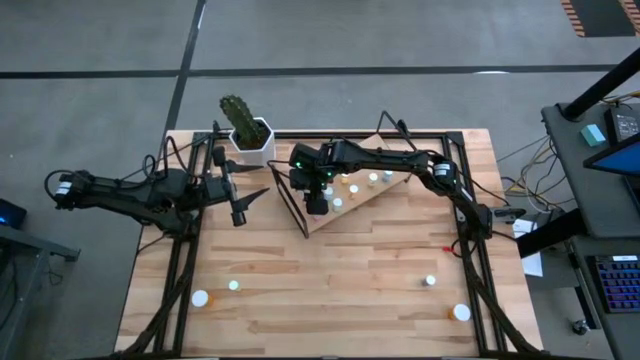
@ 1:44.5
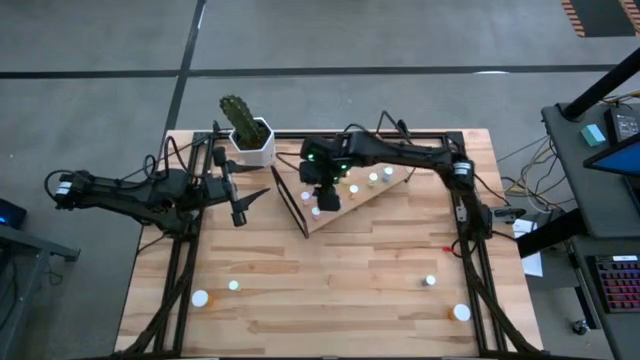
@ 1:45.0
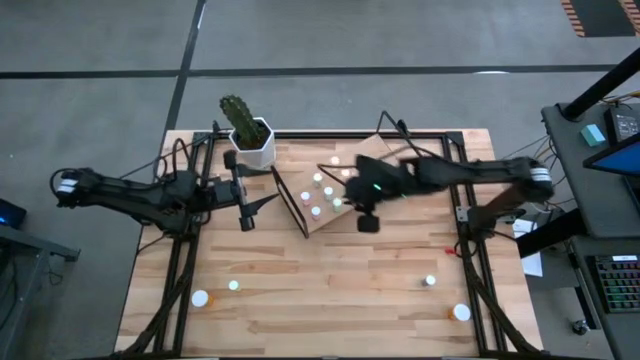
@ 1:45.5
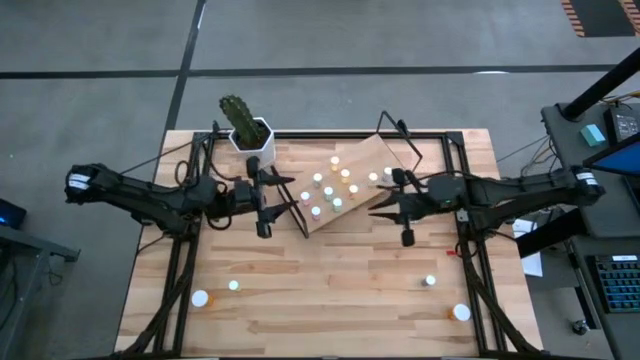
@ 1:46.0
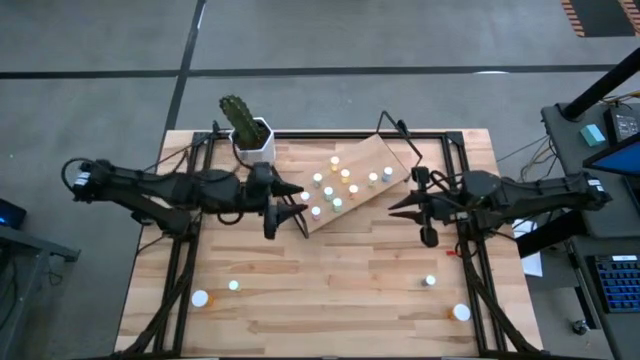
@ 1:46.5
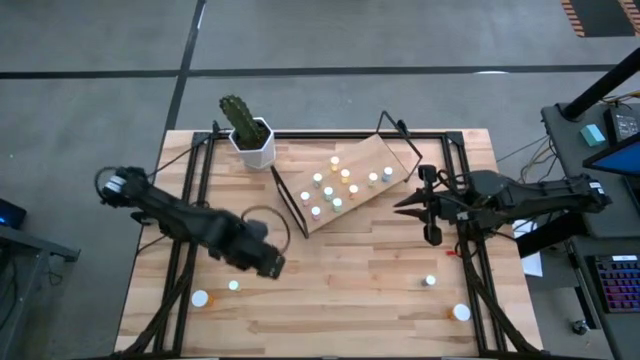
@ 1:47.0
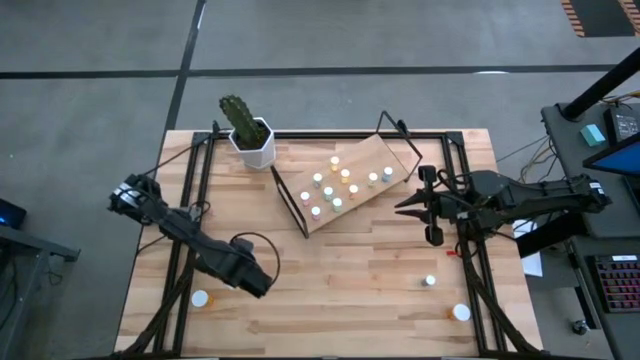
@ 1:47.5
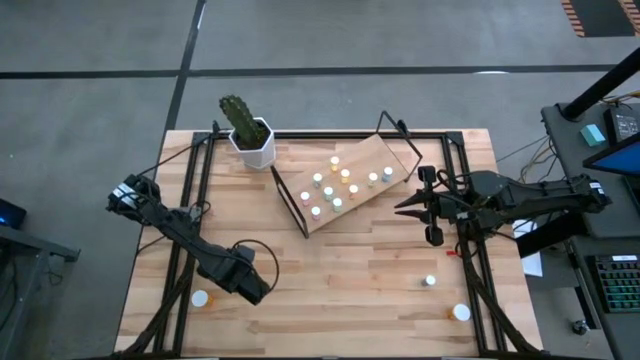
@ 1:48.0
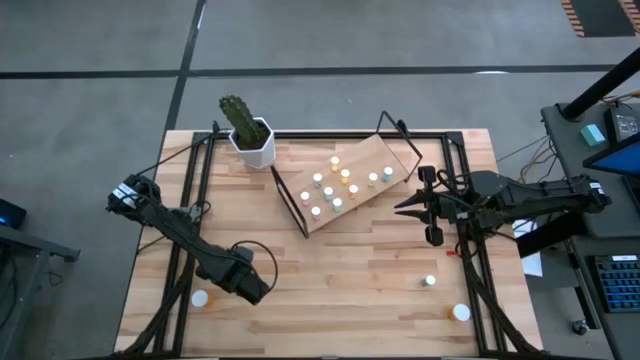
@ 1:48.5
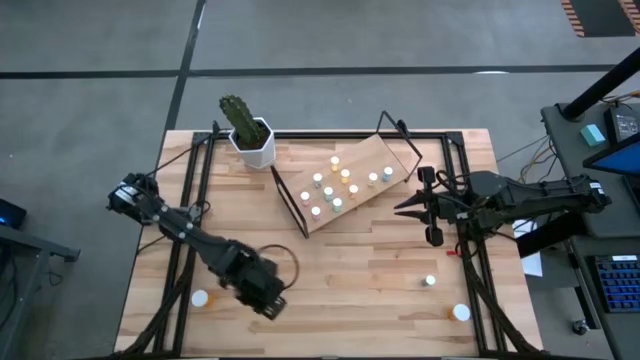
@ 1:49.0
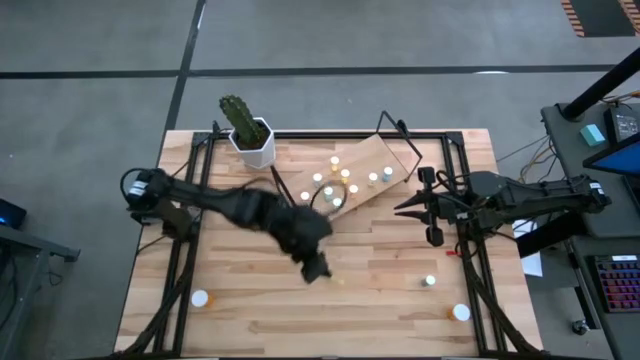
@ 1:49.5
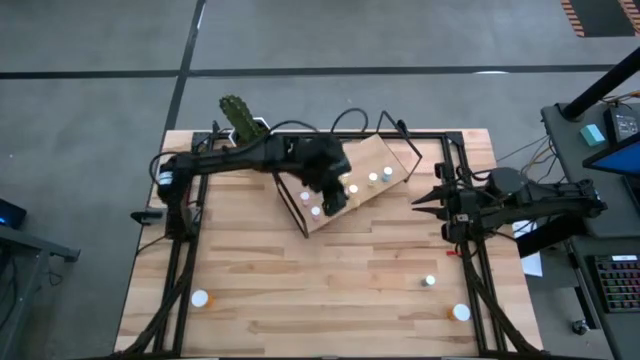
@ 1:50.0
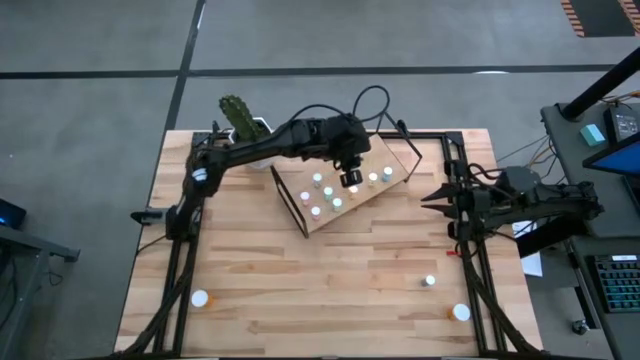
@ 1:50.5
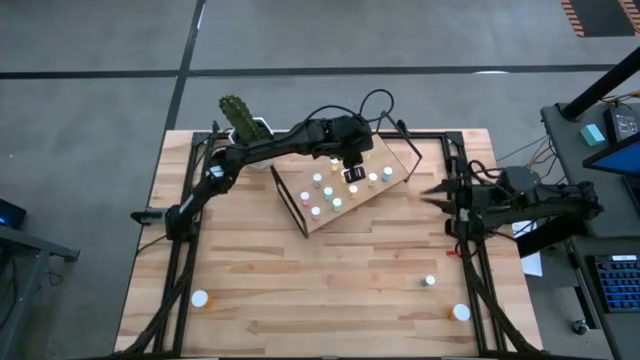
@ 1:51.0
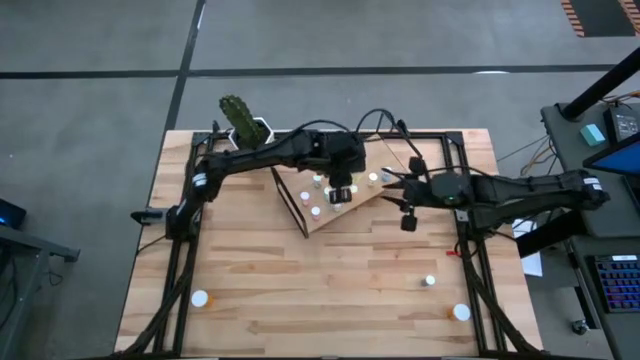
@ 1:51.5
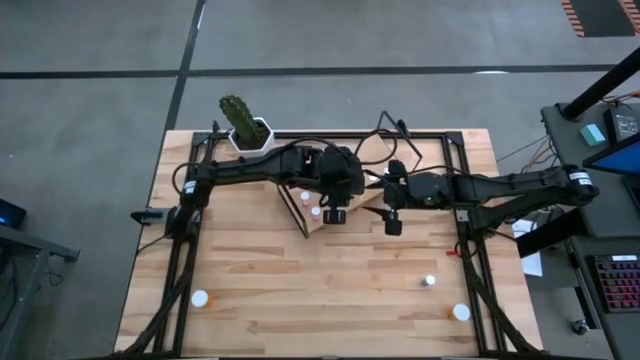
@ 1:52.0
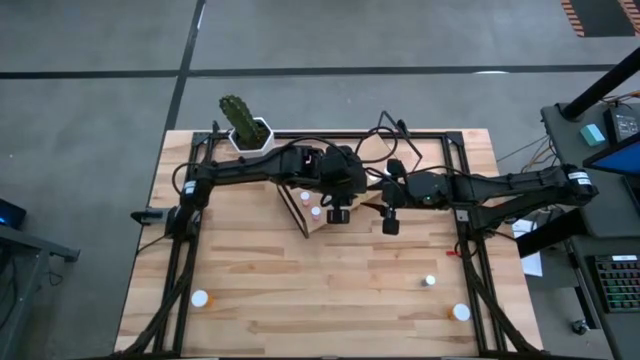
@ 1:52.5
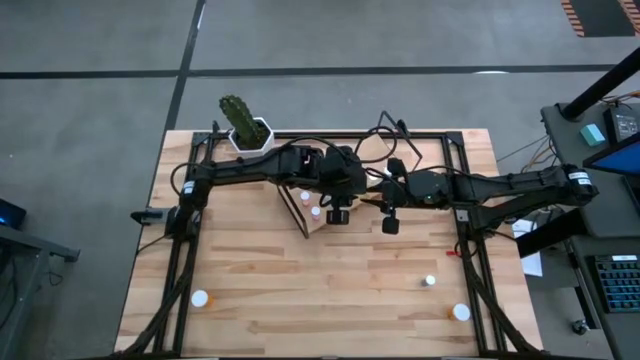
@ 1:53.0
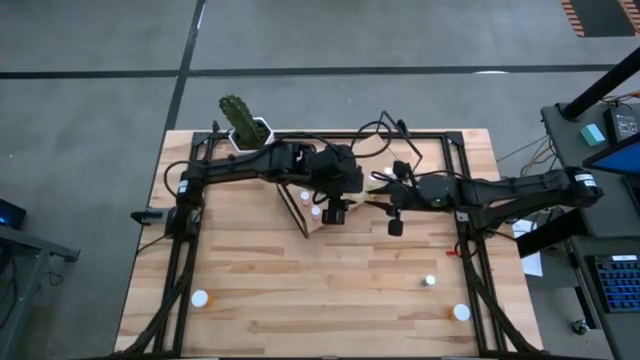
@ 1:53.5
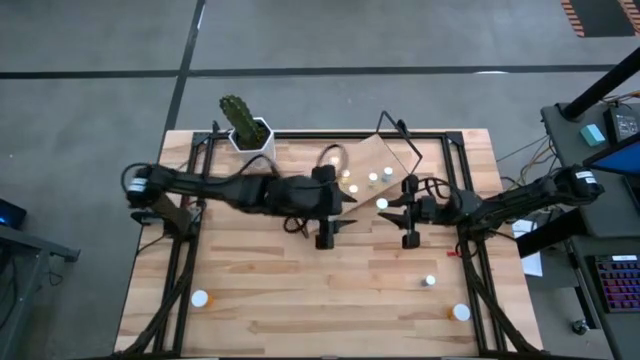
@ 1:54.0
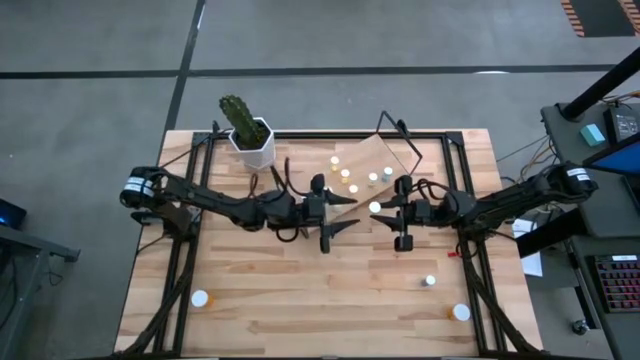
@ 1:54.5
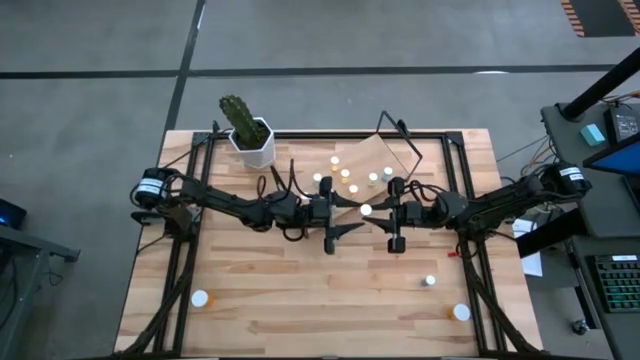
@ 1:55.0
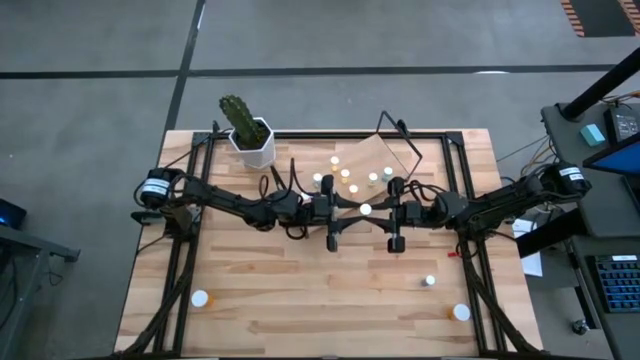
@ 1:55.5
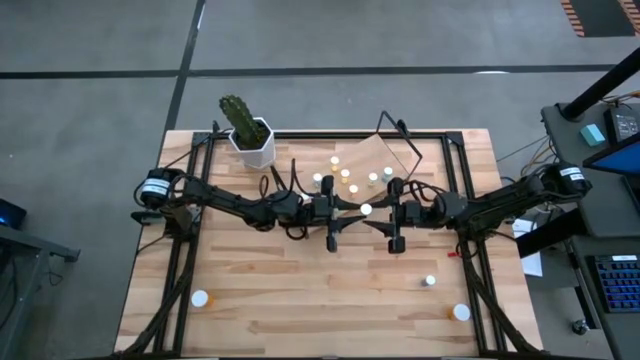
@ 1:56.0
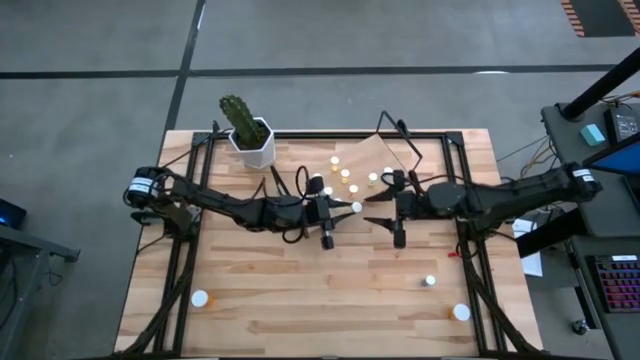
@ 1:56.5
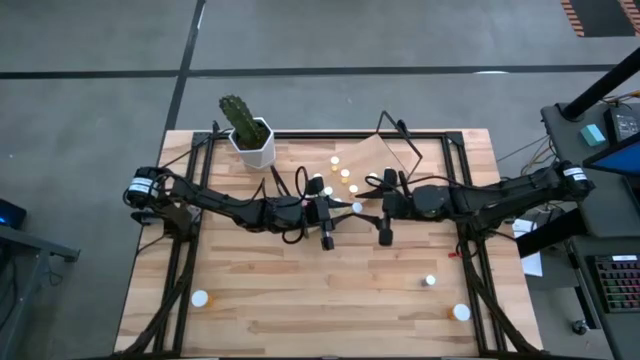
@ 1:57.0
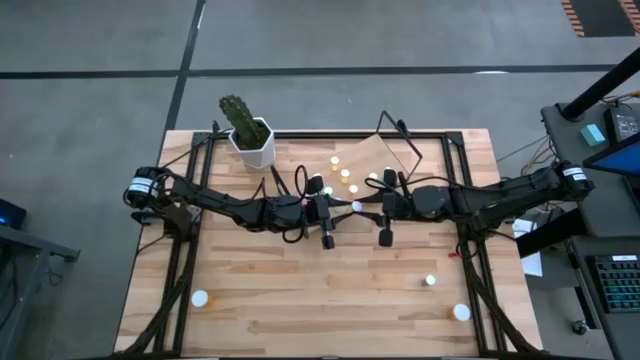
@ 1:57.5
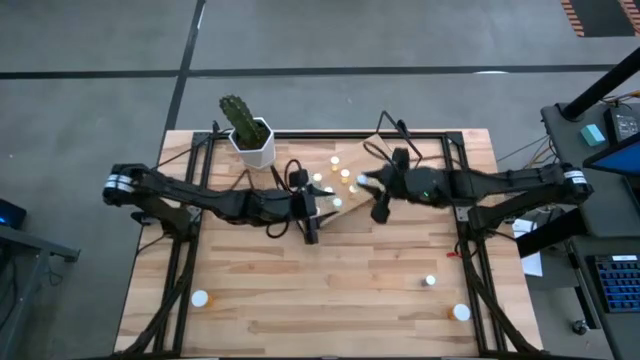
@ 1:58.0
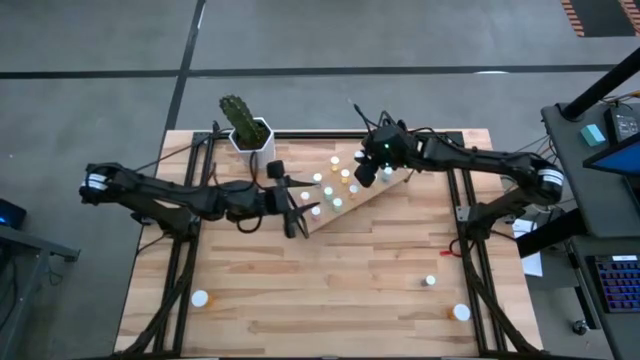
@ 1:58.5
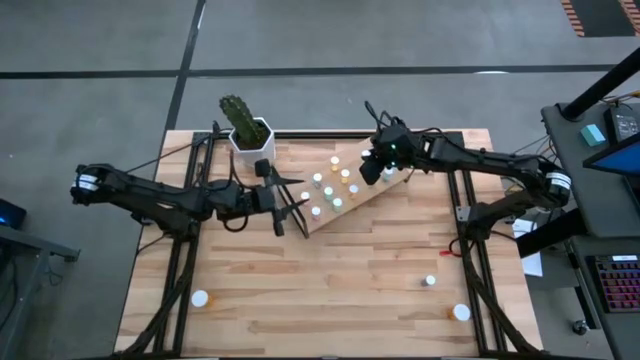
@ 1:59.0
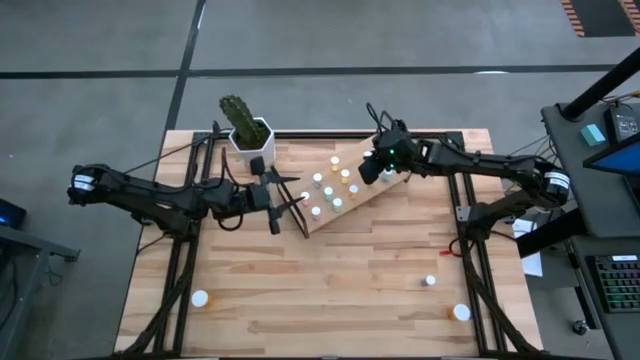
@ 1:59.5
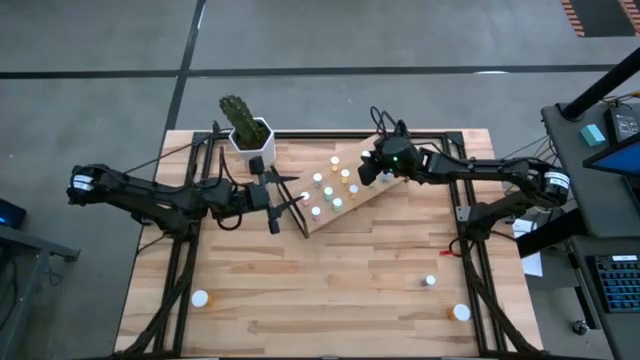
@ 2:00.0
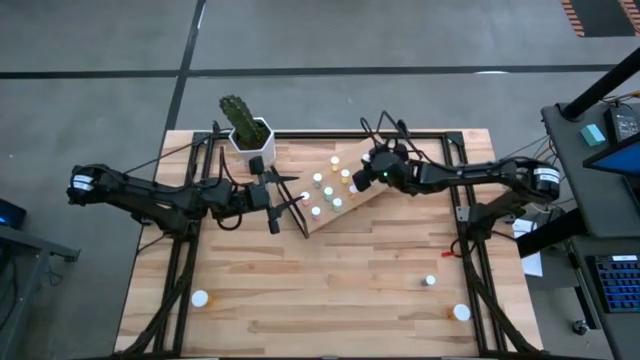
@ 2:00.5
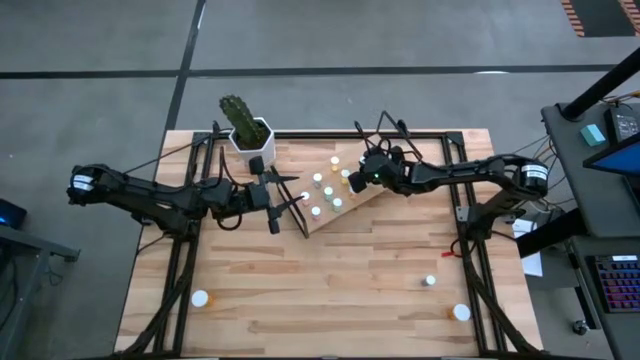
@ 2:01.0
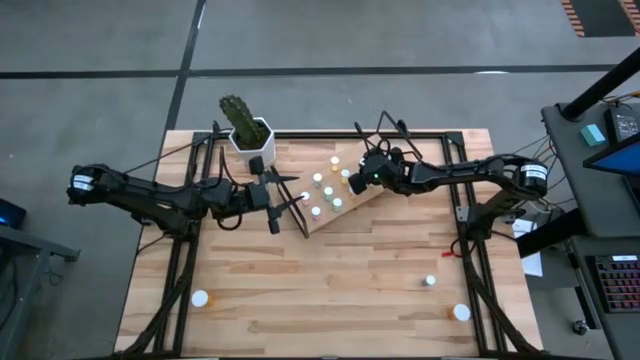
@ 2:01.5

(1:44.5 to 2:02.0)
Task: Pick and place medicine bottles onto shelf by color
Put the yellow pill bottle on the shelf aligned with the other yellow pill bottle

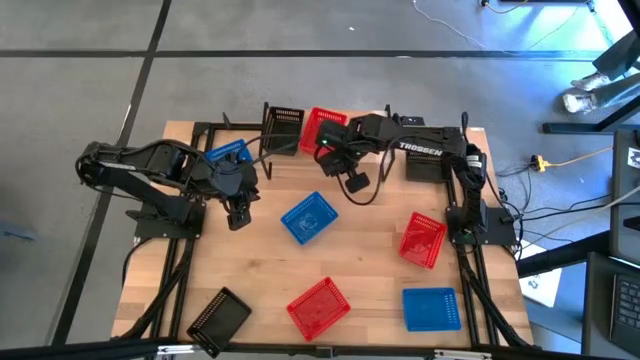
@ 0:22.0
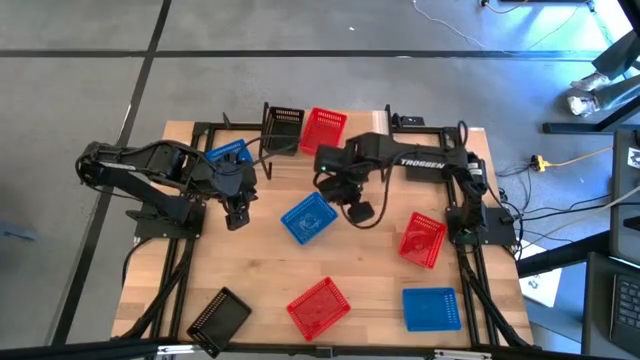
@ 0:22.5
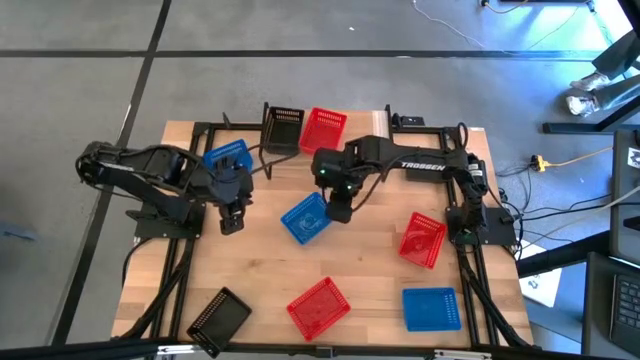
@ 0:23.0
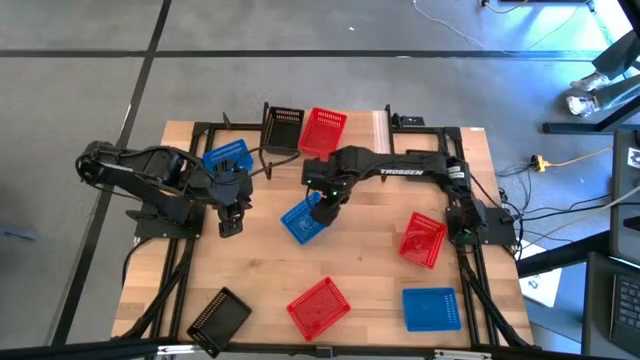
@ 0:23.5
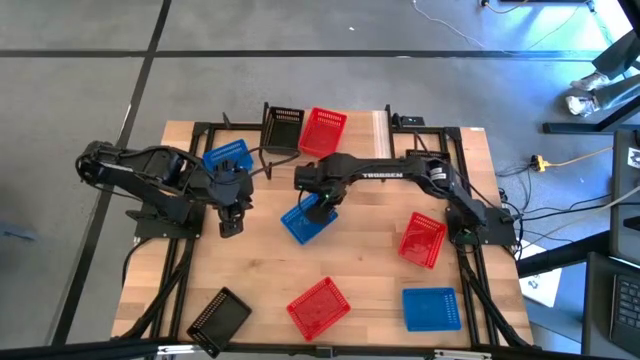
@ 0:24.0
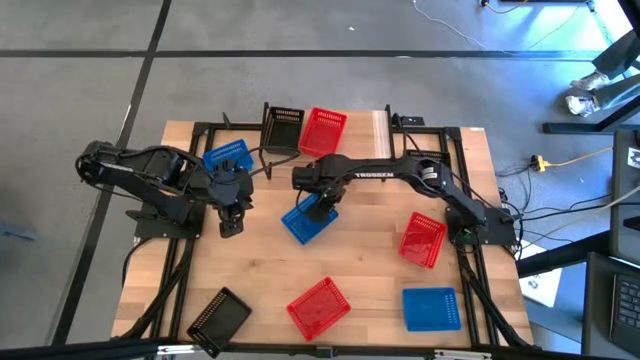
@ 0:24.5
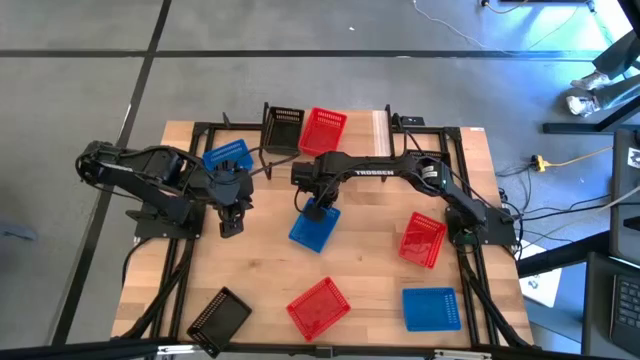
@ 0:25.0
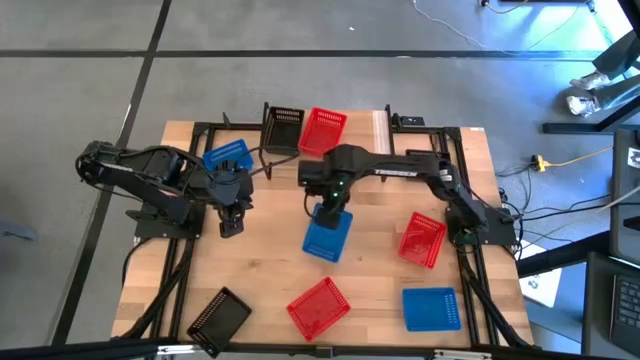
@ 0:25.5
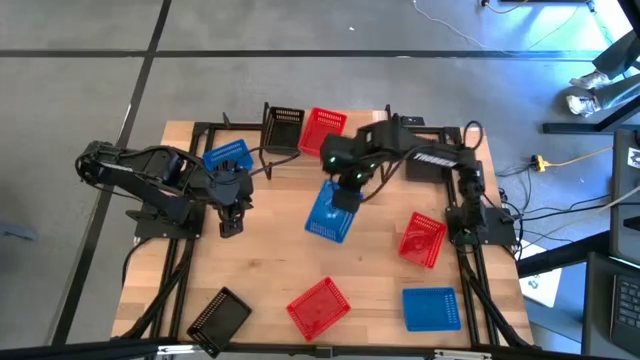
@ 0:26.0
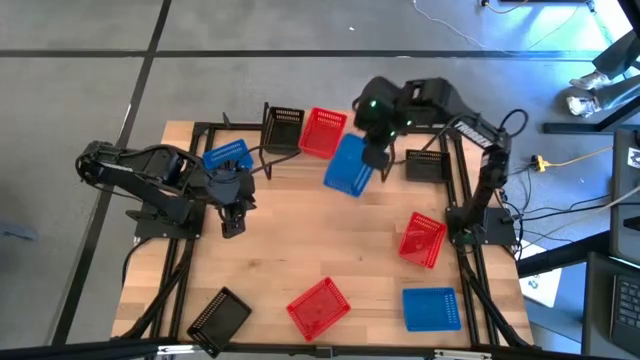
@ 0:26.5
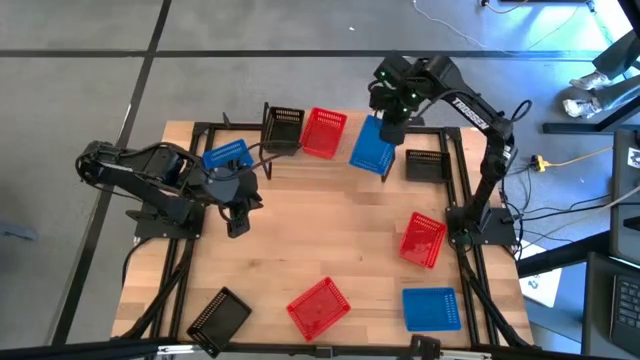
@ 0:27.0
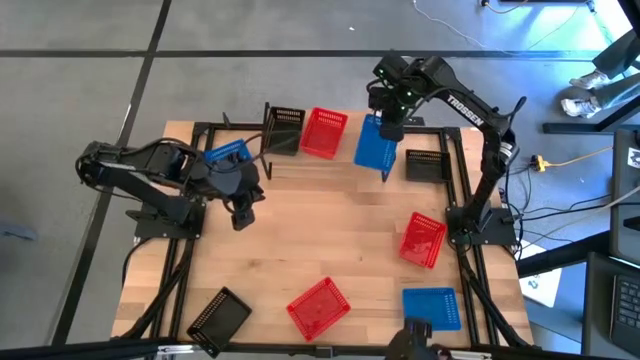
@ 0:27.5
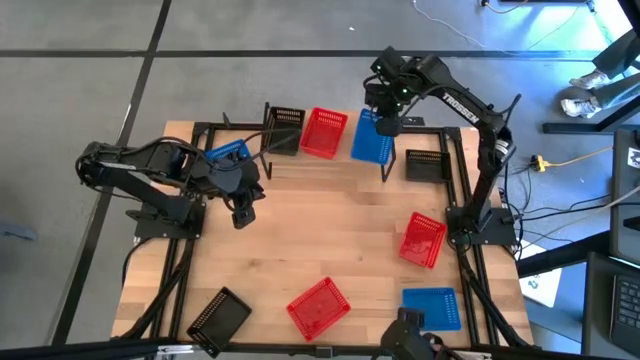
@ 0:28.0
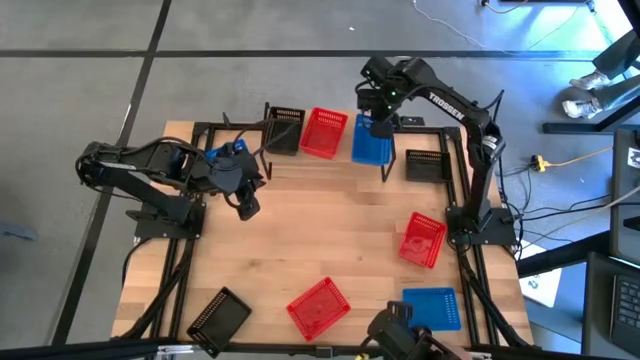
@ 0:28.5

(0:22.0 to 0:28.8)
Task: Stack baskets on shelf by color
Put the middle blue bin on the shelf
